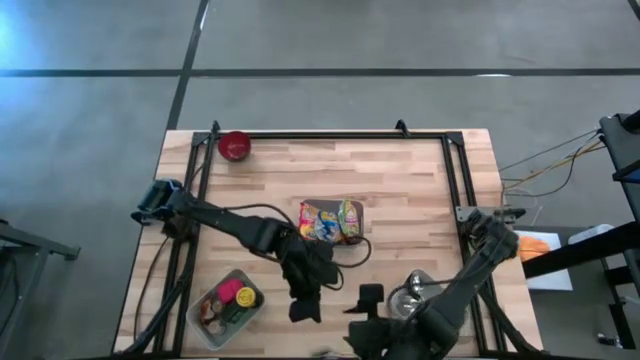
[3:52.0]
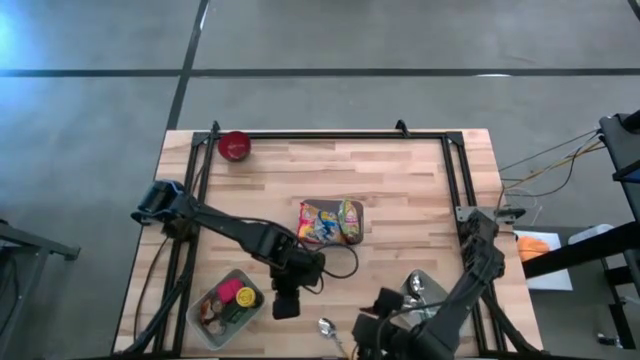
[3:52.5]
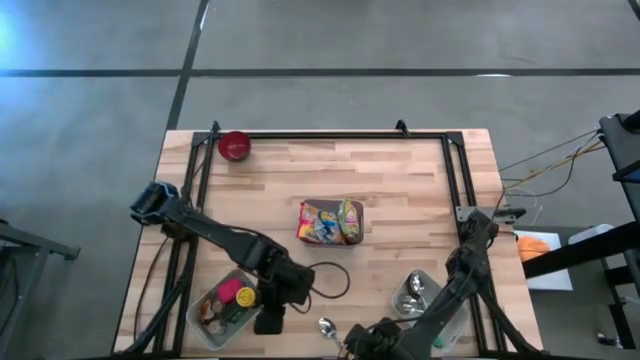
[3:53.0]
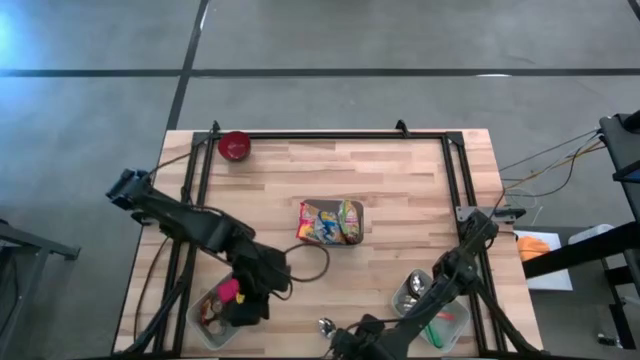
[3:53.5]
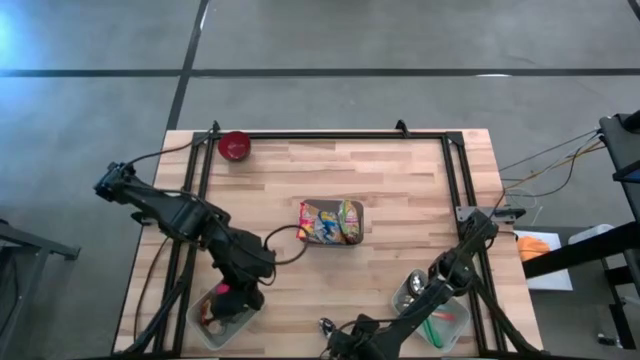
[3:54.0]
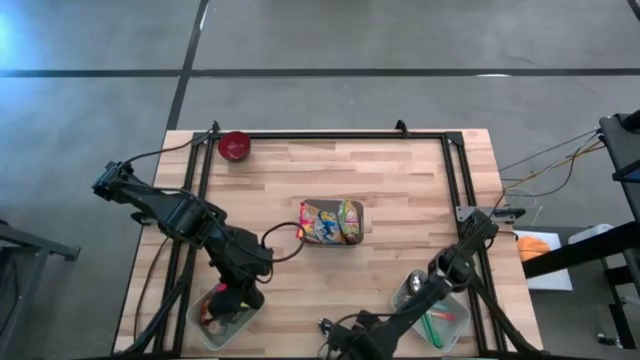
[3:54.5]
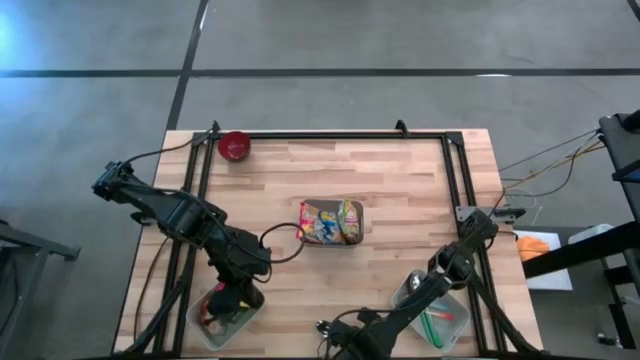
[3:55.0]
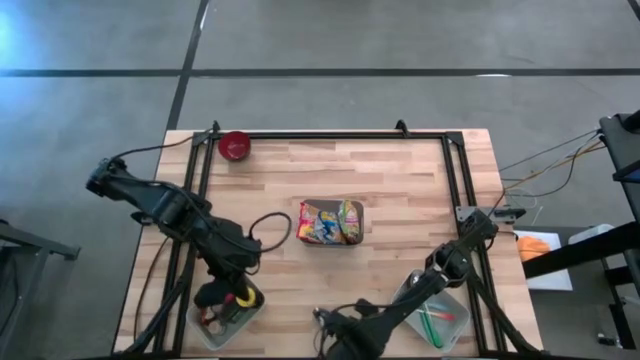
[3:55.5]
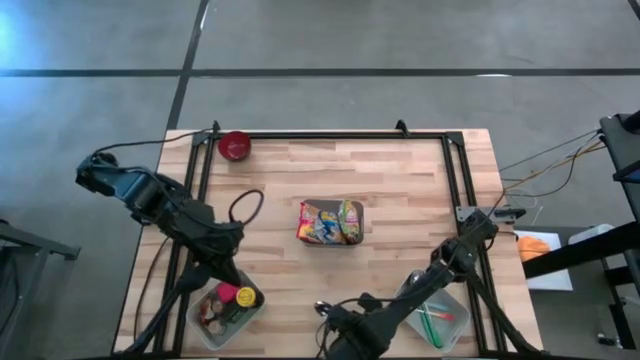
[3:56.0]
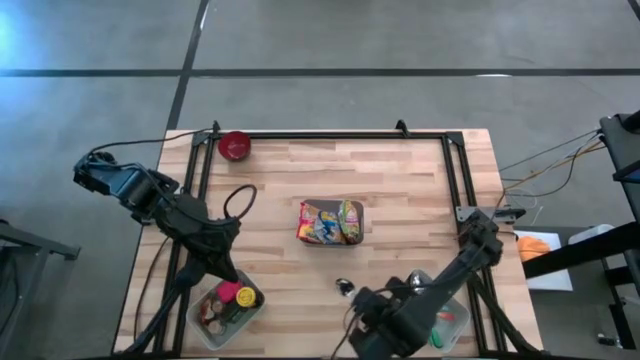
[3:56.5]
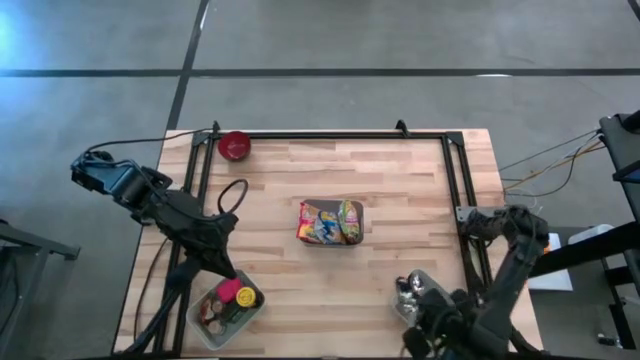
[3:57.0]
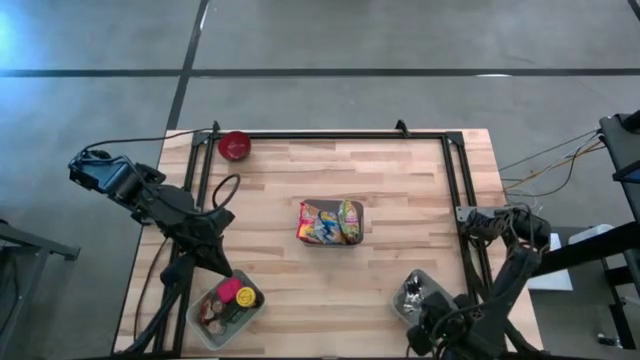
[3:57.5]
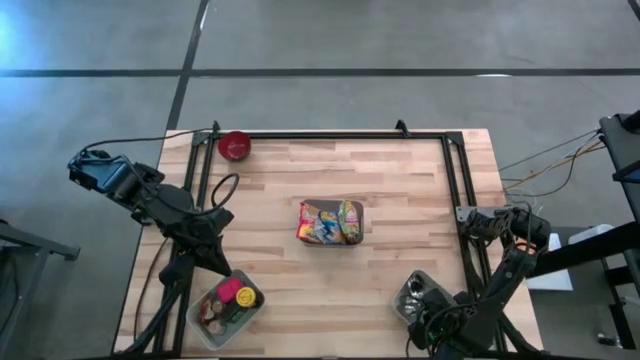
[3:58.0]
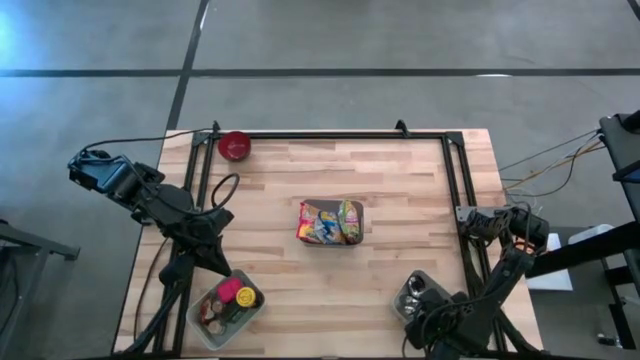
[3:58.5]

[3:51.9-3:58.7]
Put the yellow spoon into the right grey bin

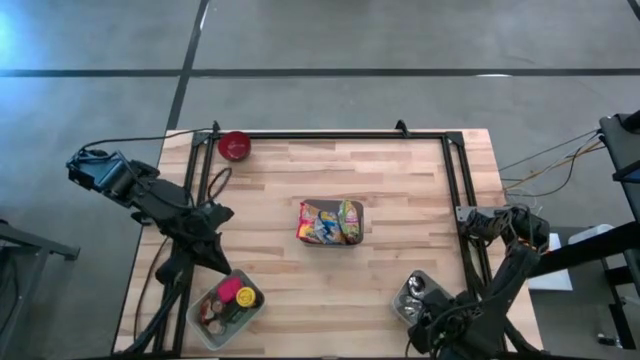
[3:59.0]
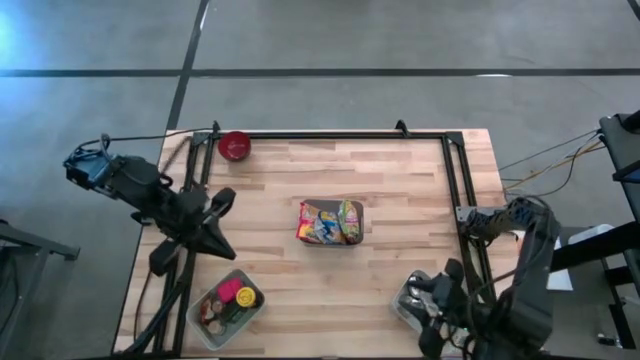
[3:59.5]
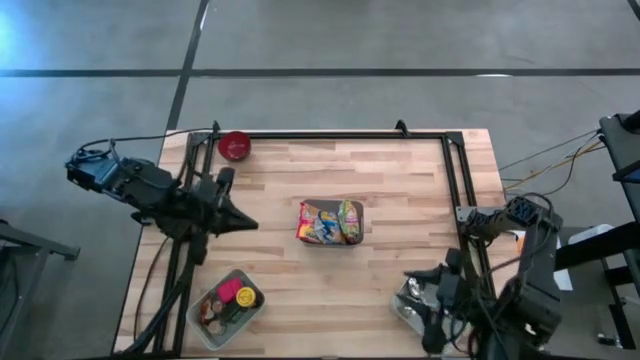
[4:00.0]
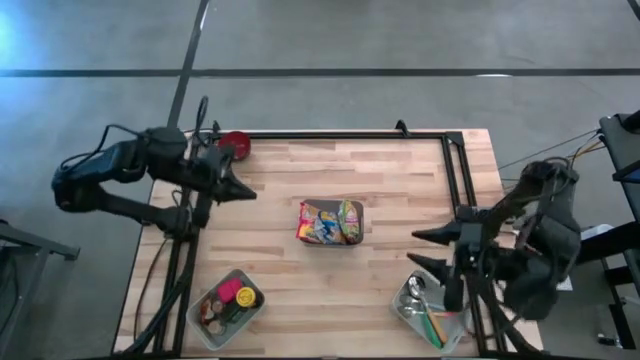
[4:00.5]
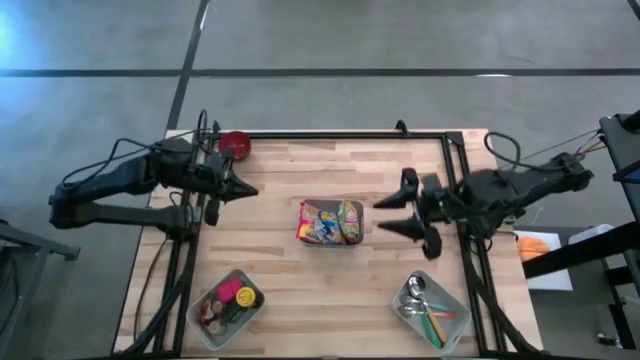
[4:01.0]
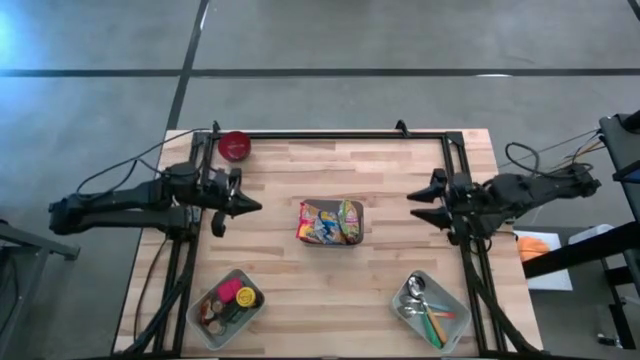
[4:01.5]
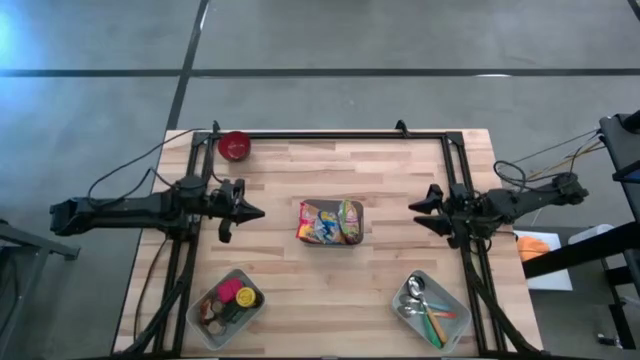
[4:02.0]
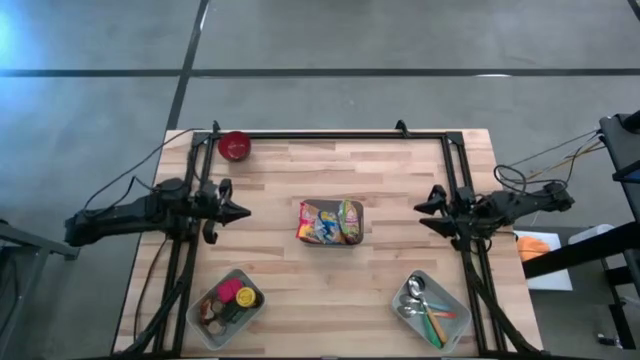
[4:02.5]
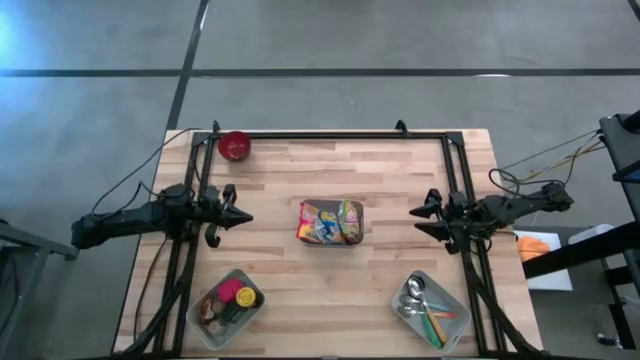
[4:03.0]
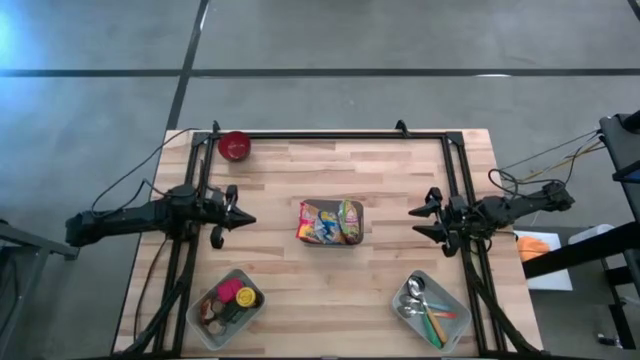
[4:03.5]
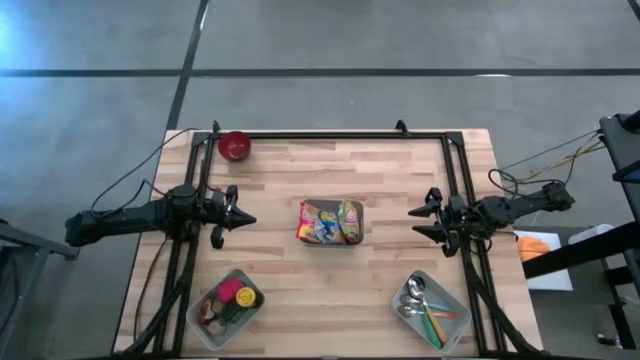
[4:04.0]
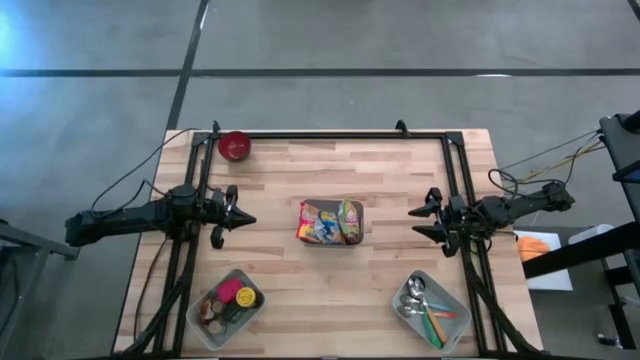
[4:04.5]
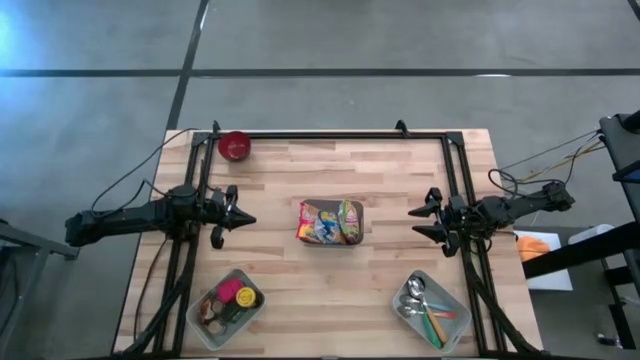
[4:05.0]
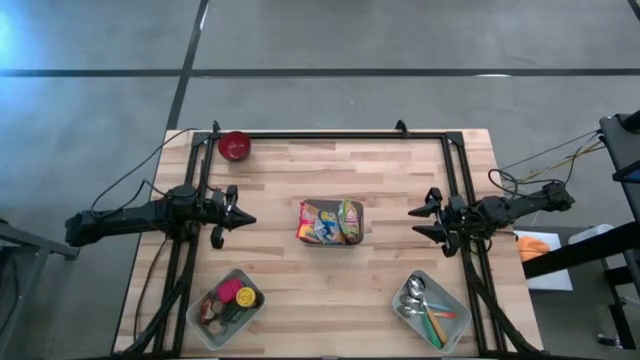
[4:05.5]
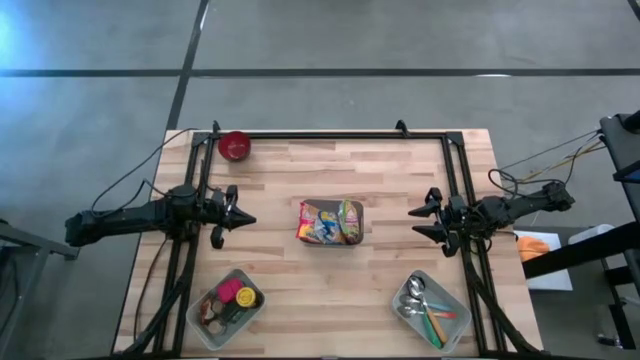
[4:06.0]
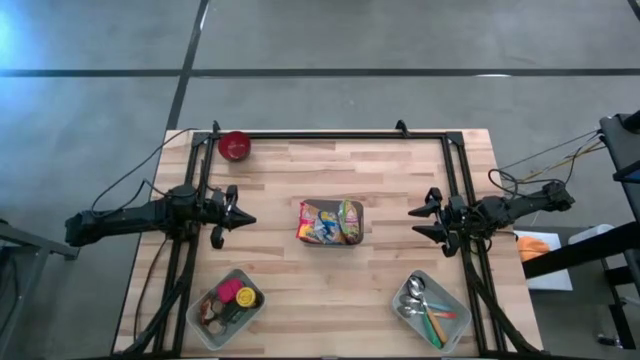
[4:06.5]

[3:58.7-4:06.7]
Return to Home Position

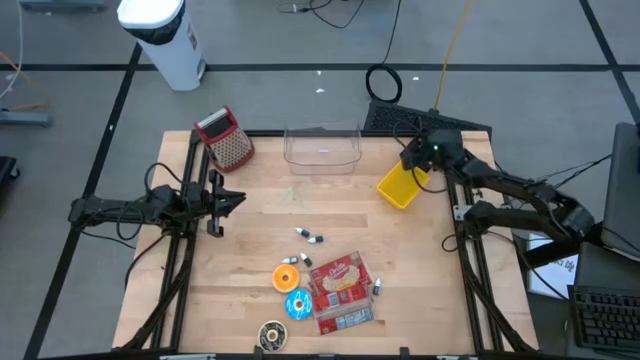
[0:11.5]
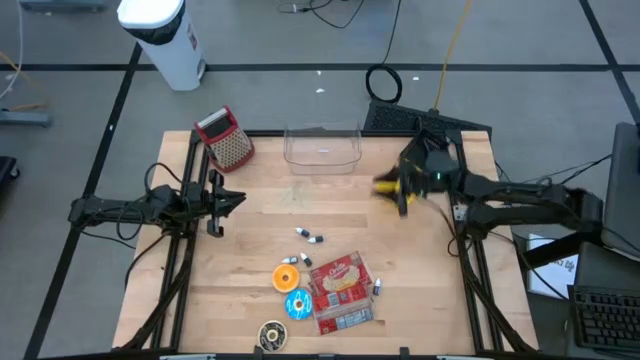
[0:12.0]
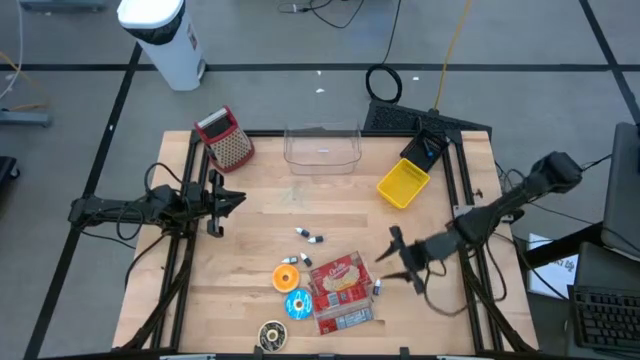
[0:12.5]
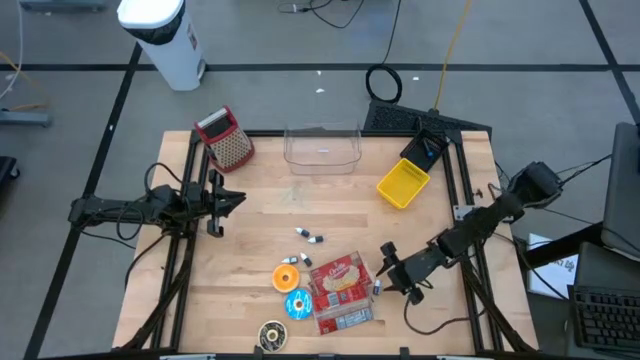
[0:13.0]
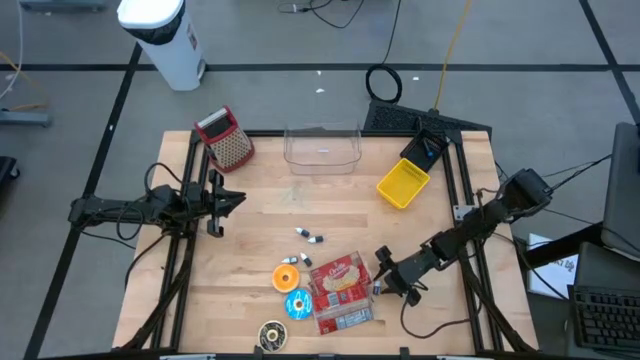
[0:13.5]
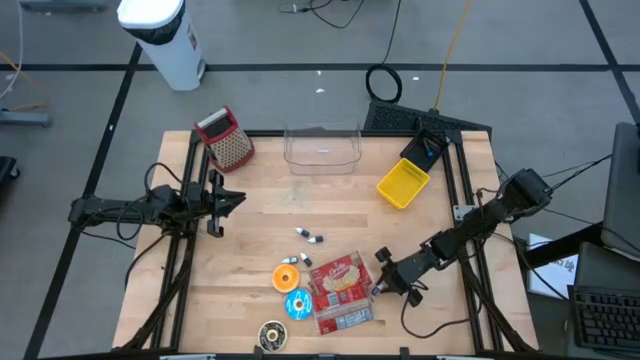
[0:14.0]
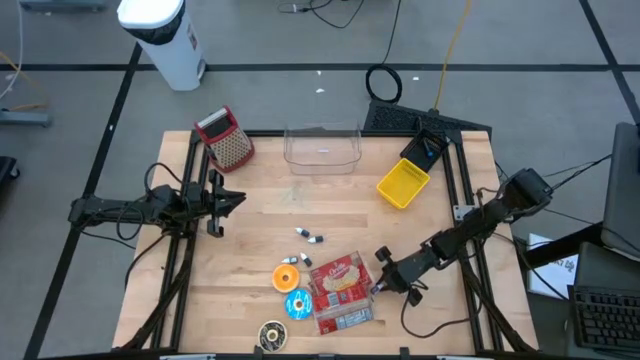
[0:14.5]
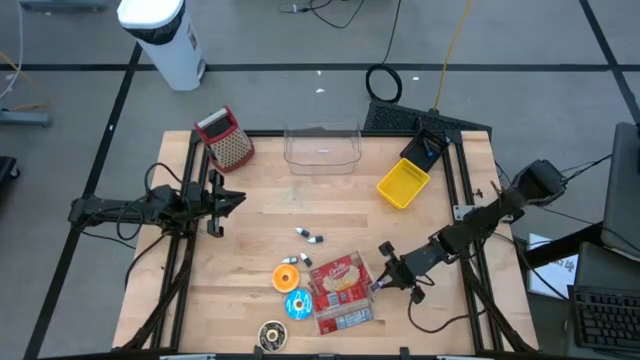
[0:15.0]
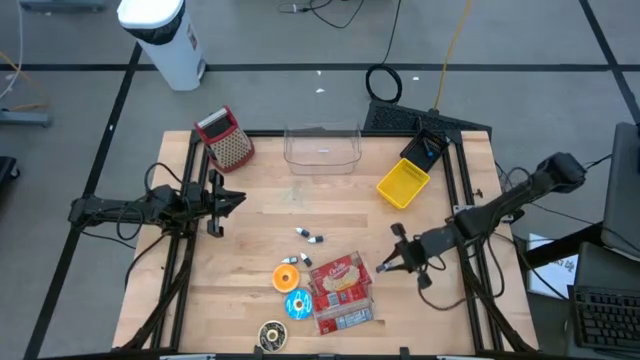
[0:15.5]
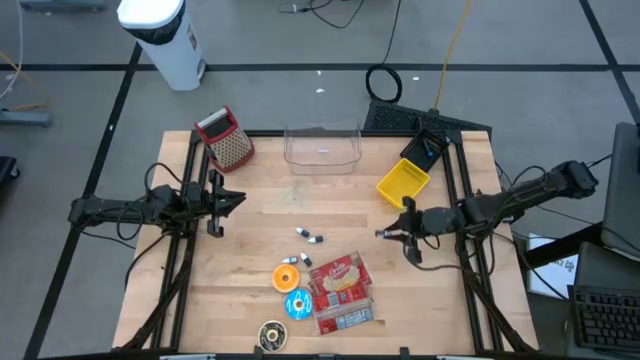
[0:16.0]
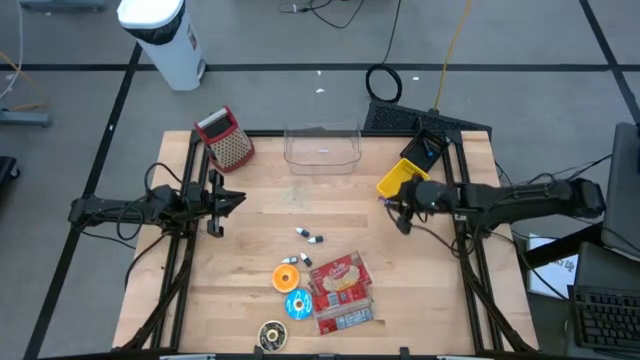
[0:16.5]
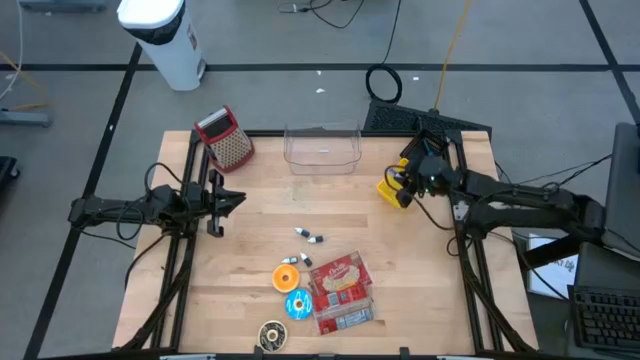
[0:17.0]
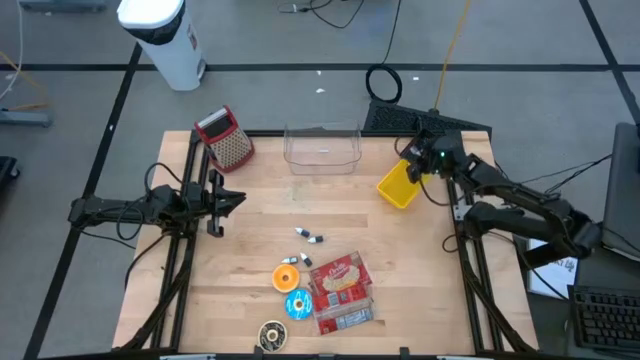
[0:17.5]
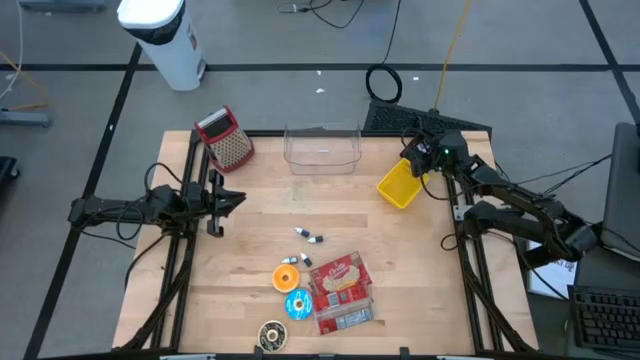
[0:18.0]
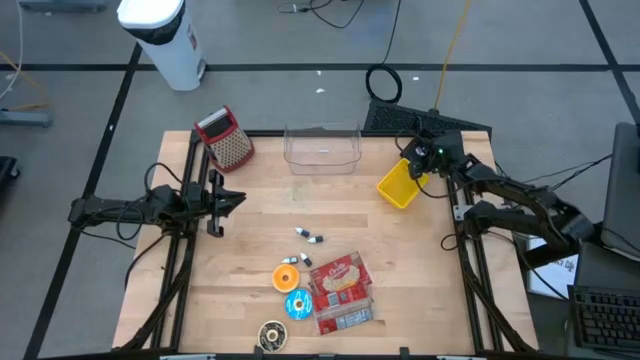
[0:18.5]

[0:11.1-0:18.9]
Put the violet food coloring bottle into the black bin
